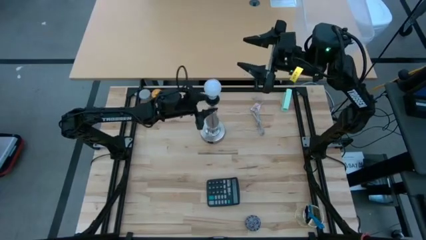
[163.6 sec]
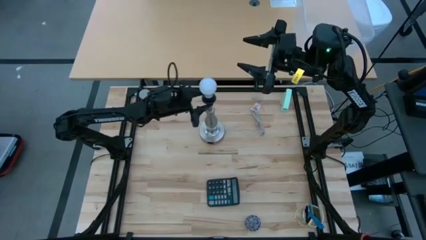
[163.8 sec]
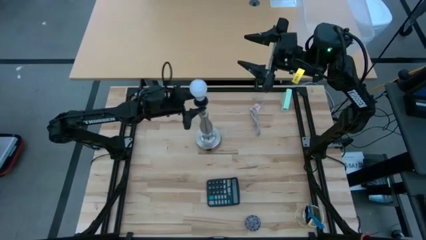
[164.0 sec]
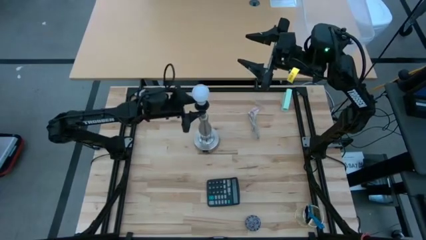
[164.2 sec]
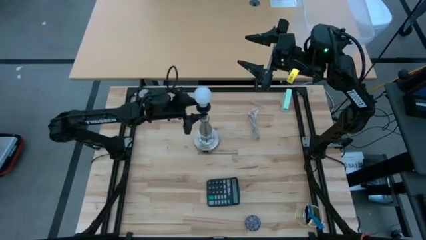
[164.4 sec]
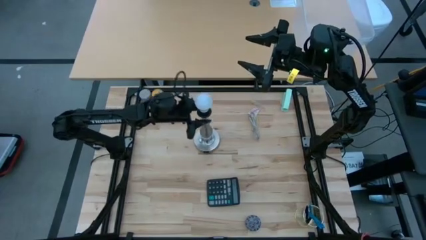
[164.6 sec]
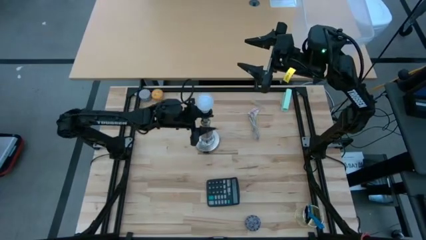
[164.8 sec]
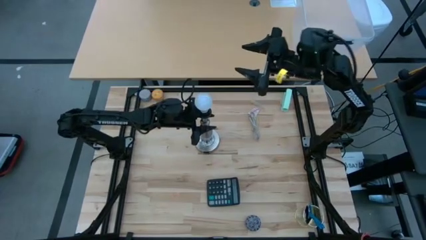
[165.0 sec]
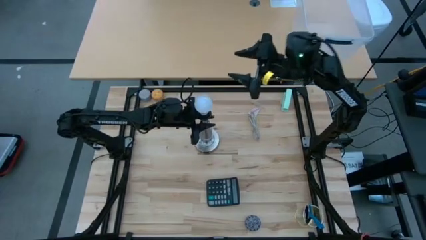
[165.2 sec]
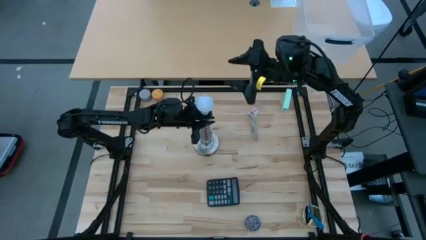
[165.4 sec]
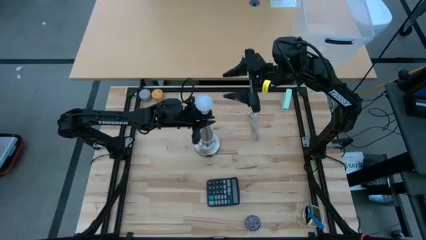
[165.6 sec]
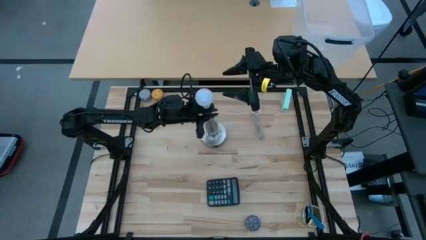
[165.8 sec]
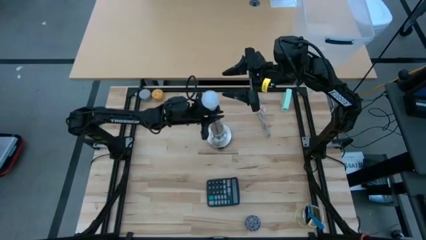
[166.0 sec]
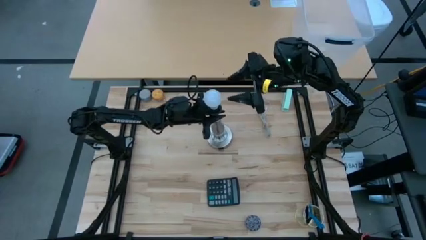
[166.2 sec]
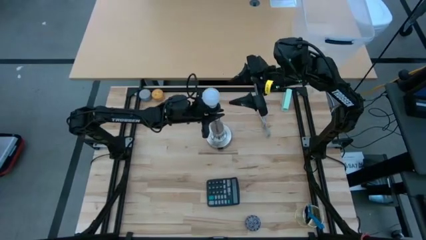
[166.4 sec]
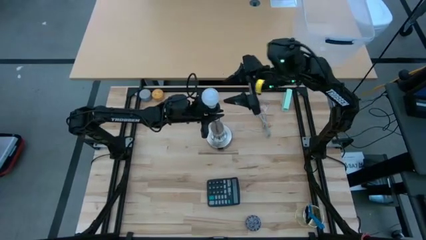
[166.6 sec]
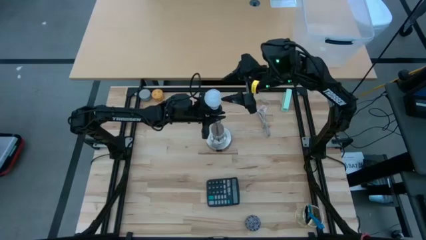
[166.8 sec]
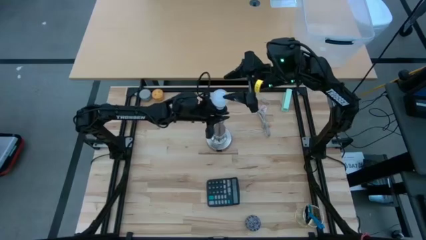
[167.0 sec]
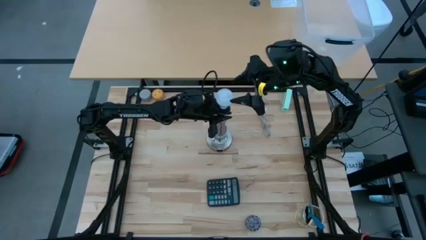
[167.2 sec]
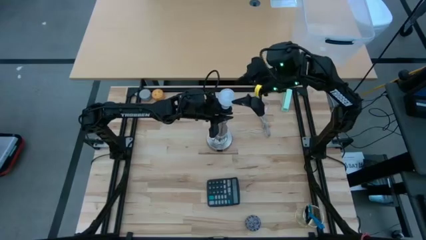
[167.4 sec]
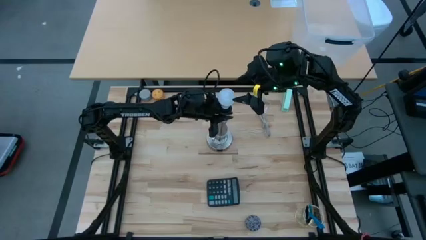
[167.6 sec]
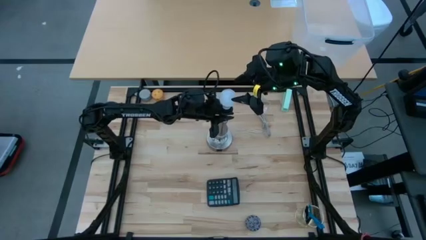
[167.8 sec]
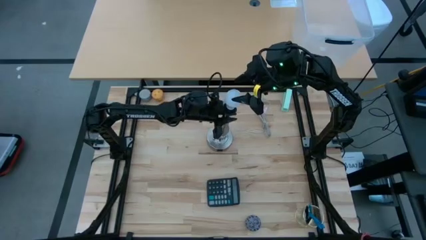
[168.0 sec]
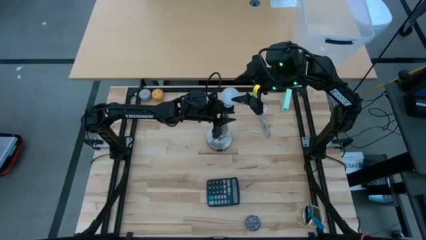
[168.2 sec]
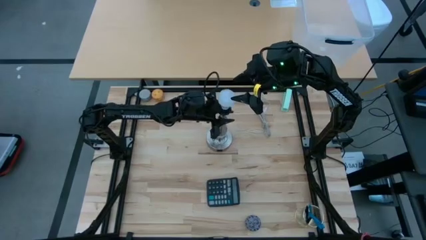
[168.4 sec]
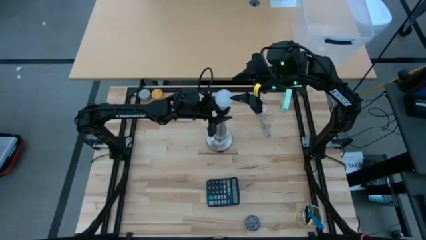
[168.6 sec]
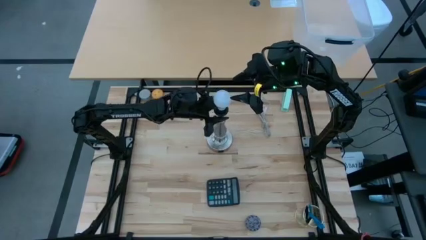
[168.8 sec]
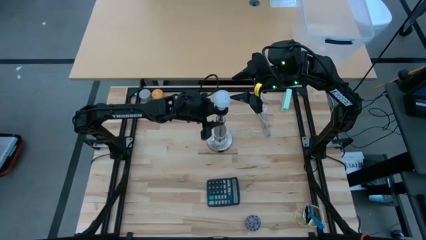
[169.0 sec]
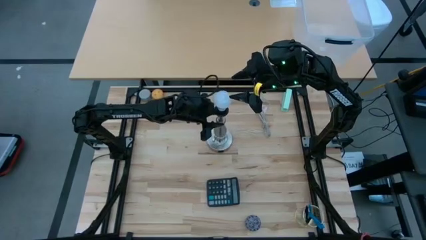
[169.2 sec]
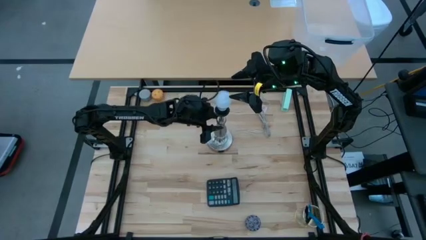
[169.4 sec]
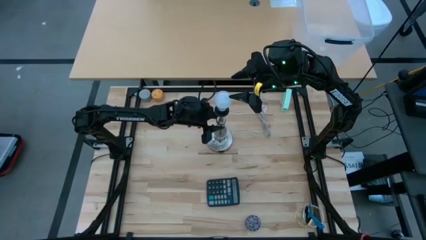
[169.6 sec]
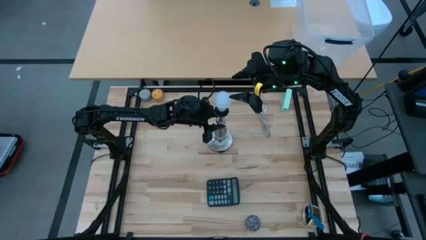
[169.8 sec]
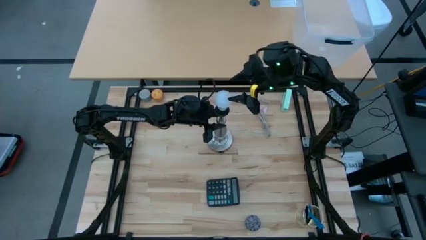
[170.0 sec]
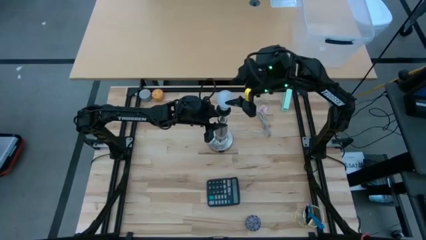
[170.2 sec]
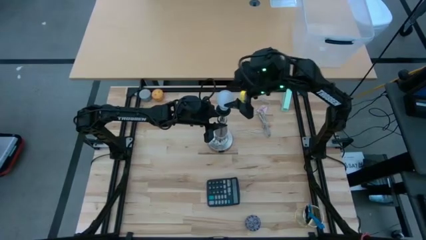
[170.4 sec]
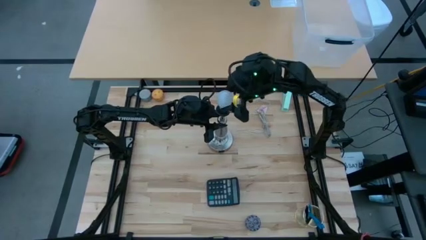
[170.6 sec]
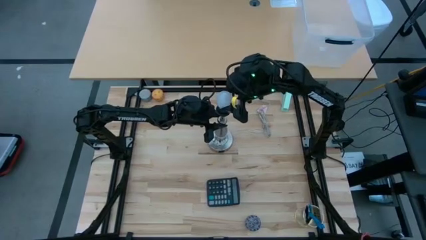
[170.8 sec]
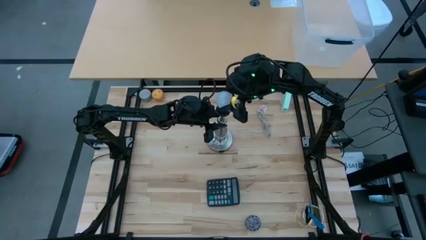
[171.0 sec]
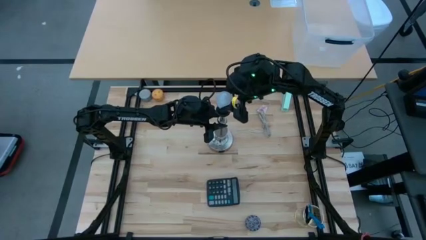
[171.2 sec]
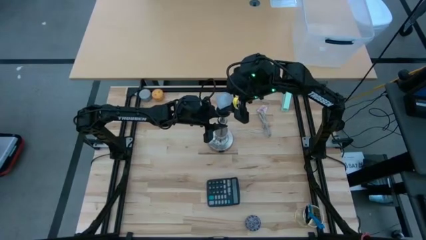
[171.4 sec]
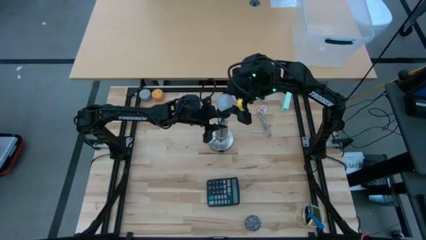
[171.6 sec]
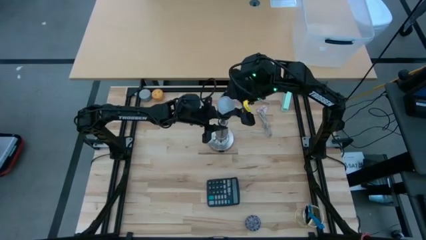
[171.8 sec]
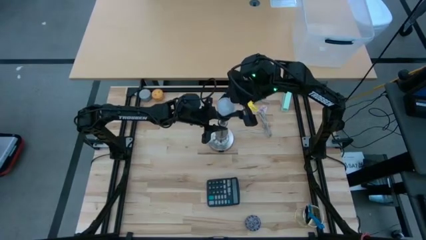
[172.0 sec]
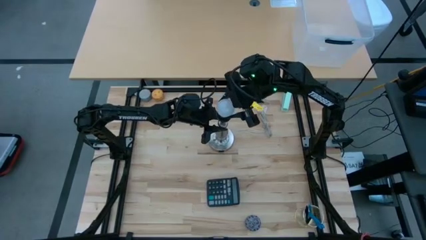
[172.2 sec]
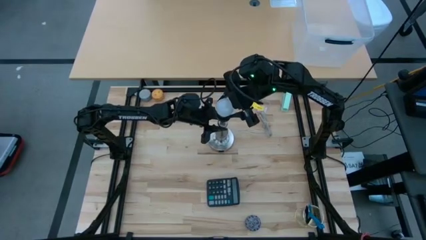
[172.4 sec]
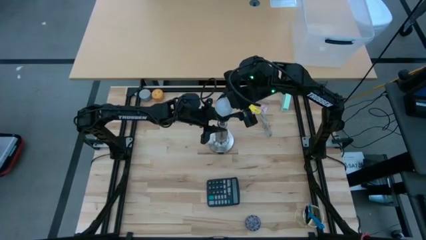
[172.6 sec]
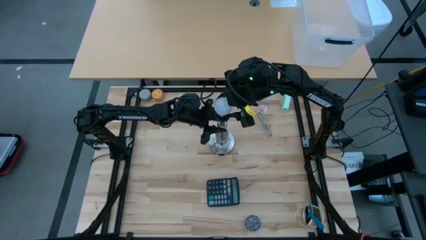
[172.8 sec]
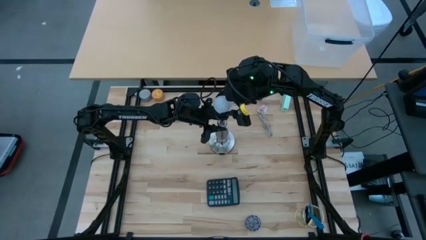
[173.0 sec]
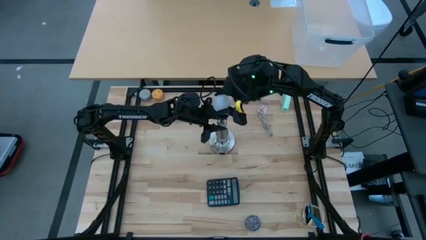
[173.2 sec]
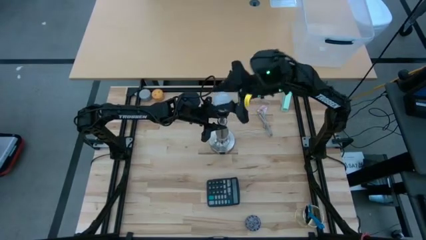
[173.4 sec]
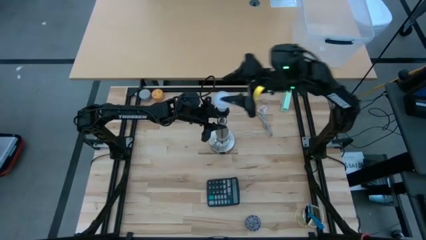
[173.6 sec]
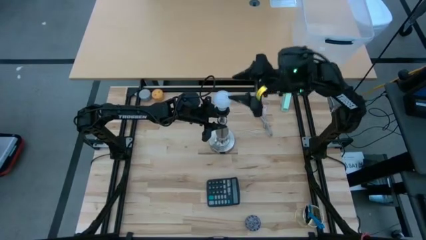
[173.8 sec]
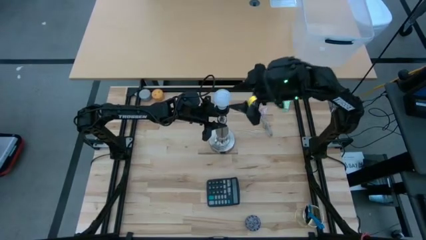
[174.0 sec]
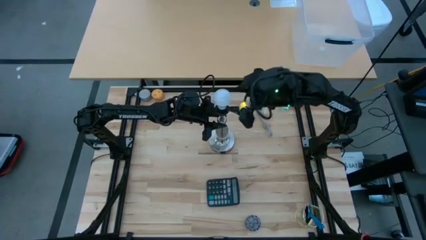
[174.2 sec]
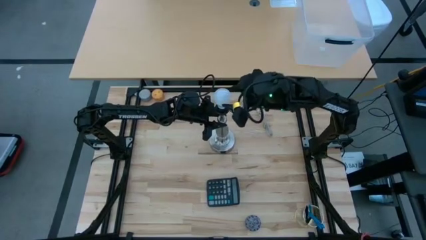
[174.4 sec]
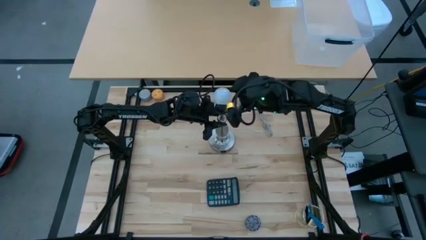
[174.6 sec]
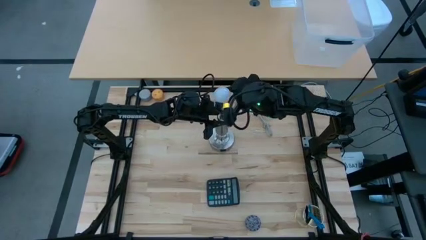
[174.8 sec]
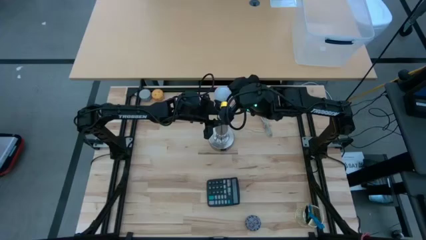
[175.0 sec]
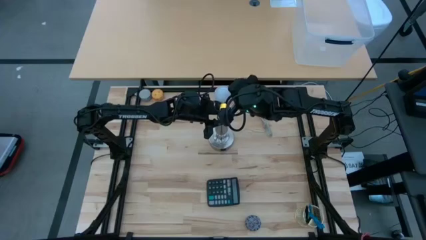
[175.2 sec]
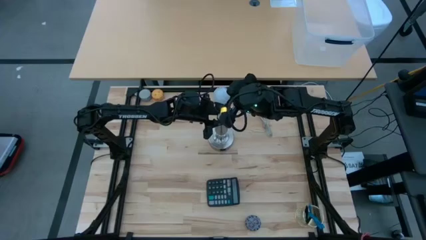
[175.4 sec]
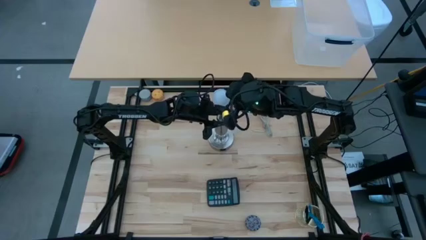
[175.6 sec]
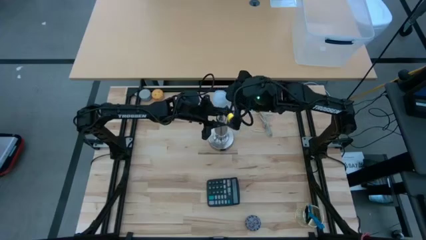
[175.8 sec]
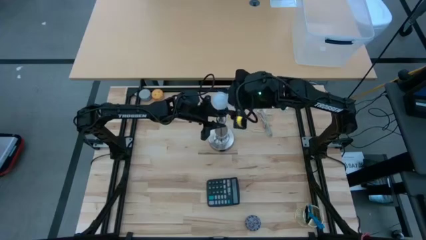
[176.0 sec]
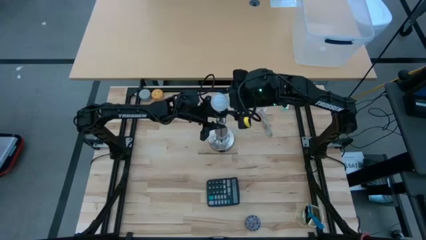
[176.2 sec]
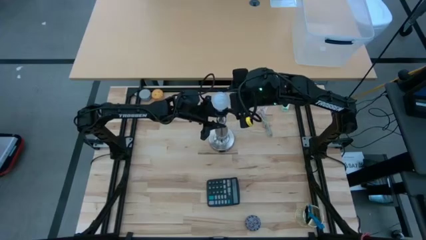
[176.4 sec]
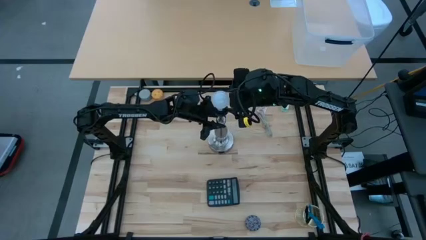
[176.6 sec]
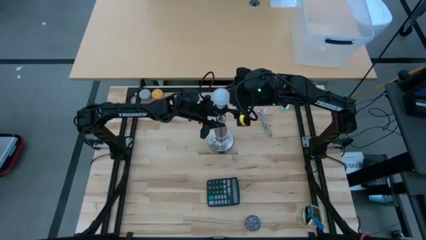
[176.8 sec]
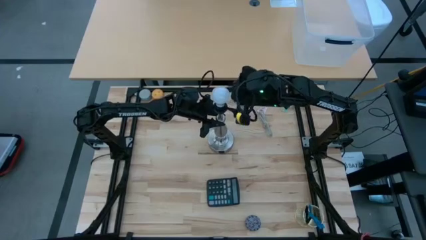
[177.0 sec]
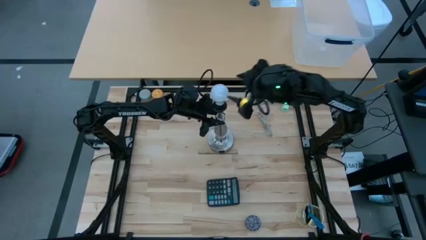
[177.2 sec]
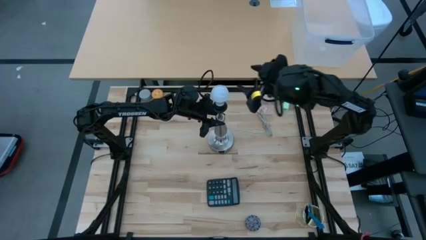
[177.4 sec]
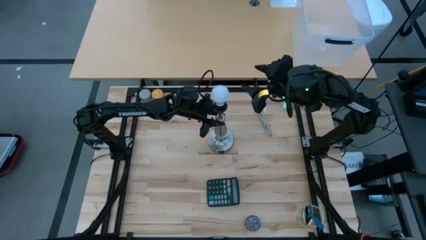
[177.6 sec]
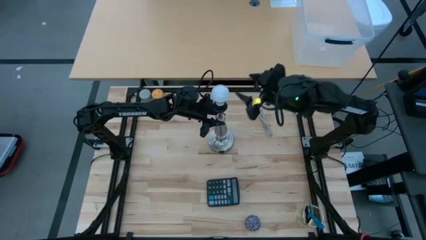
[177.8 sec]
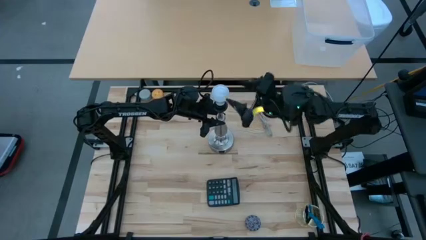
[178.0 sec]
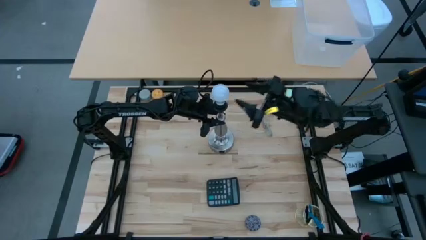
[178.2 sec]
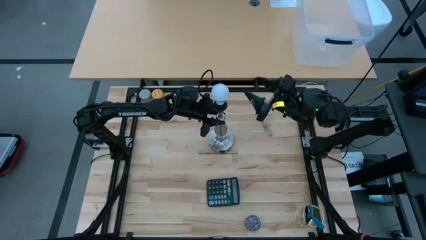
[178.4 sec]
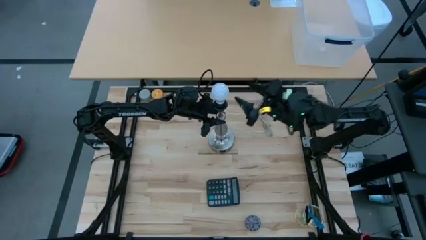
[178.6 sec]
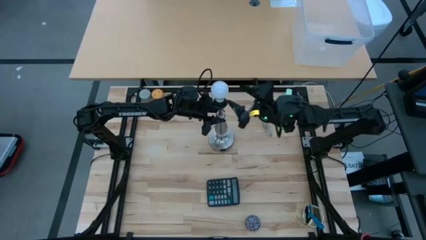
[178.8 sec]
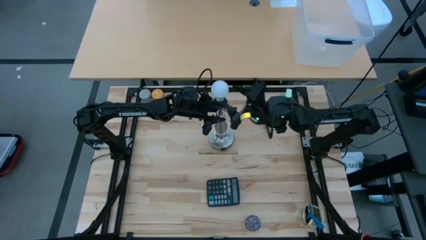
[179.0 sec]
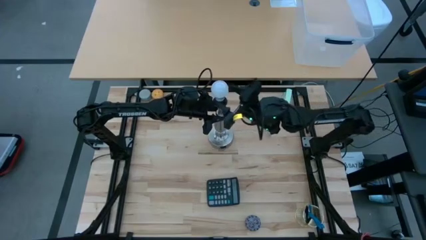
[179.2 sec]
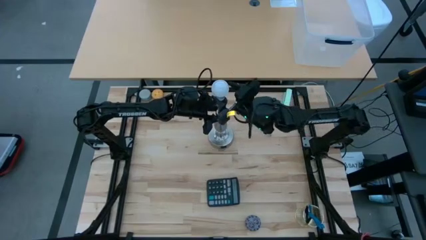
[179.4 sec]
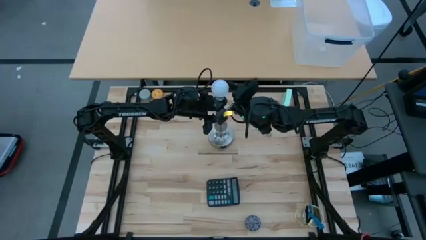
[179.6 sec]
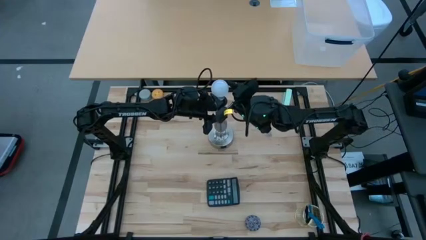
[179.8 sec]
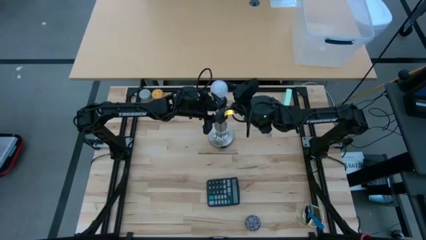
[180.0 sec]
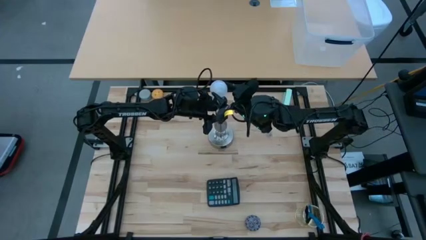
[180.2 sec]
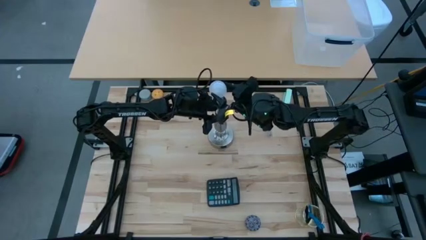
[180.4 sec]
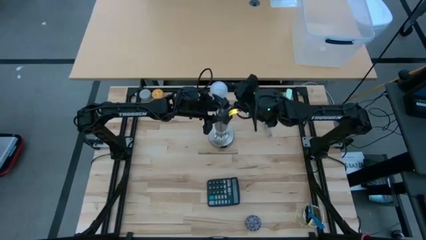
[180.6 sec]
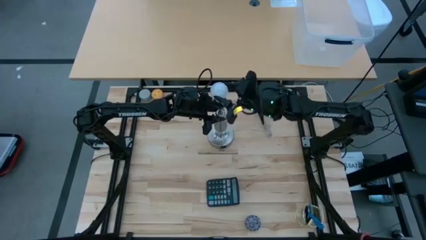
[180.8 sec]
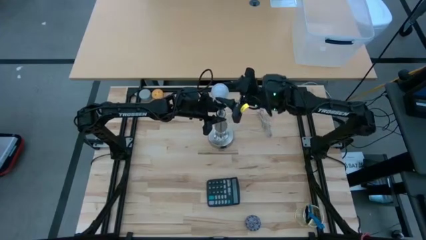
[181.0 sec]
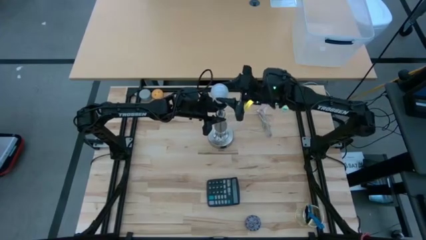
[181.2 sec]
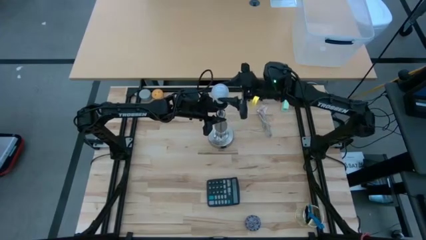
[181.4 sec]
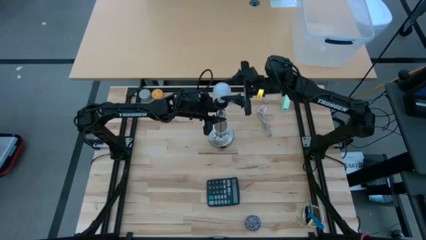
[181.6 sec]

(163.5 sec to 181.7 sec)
Task: Screw lightbulb
Remove the light bulb from the lamp
